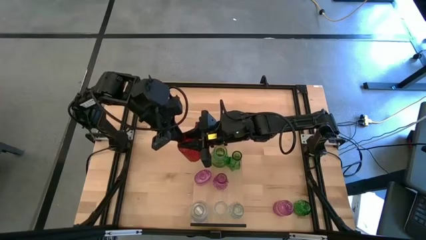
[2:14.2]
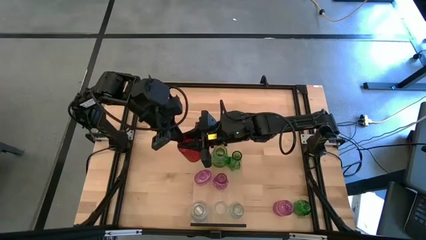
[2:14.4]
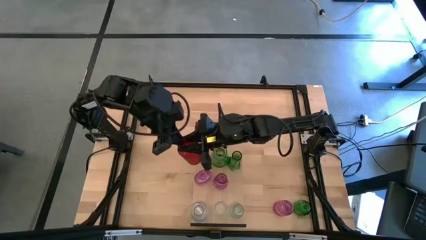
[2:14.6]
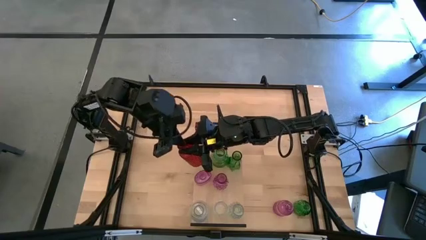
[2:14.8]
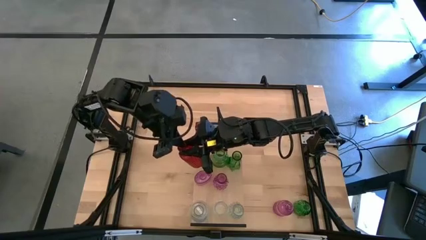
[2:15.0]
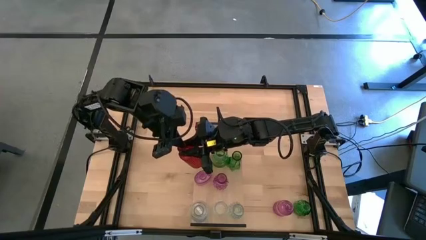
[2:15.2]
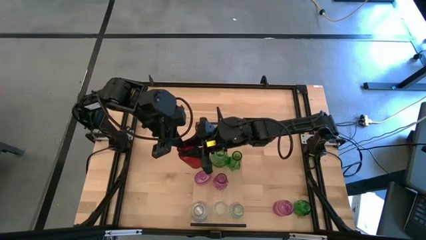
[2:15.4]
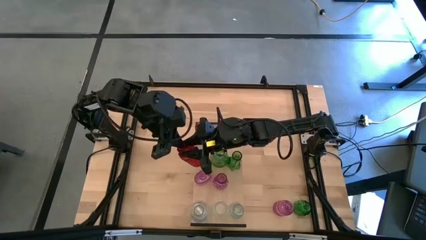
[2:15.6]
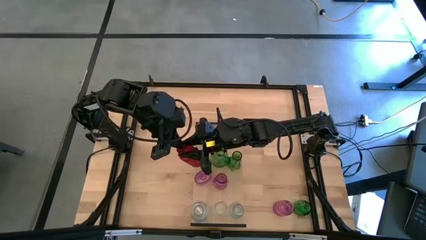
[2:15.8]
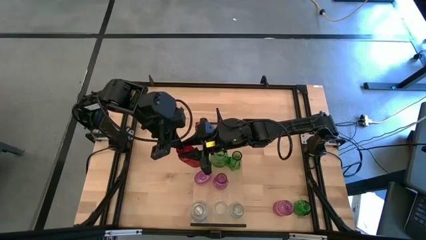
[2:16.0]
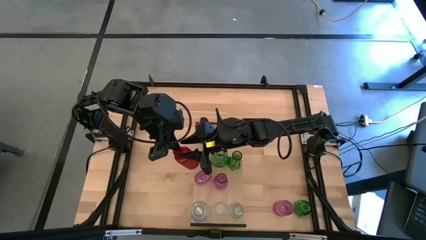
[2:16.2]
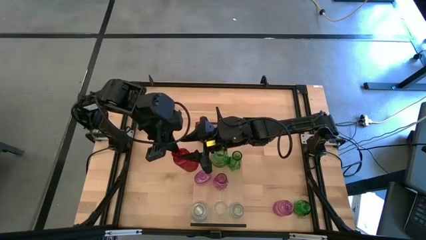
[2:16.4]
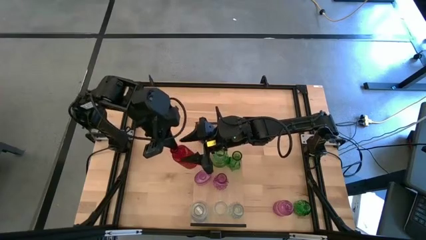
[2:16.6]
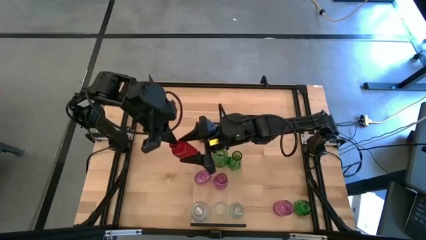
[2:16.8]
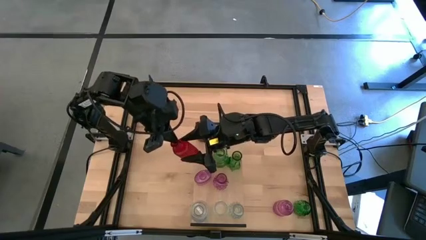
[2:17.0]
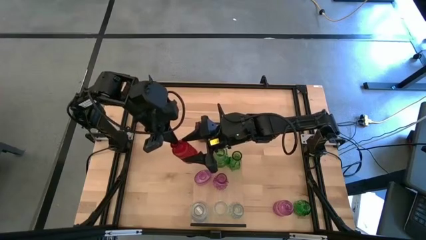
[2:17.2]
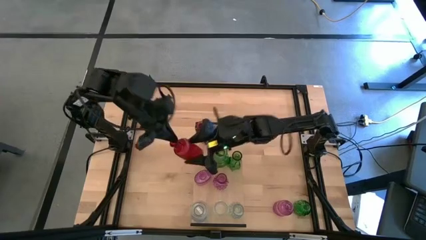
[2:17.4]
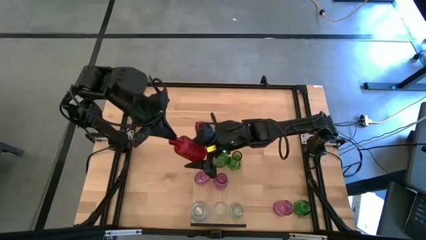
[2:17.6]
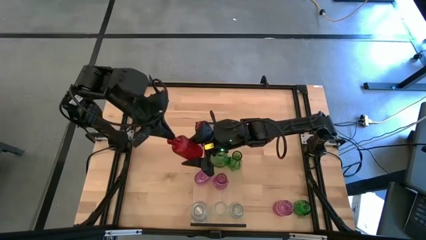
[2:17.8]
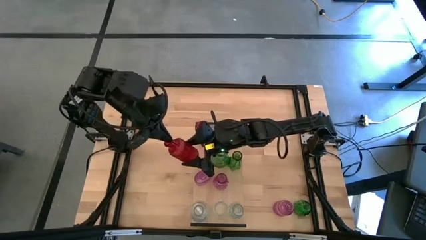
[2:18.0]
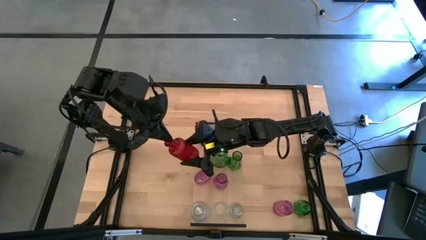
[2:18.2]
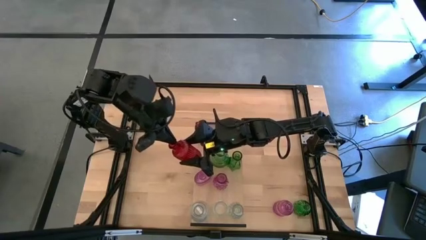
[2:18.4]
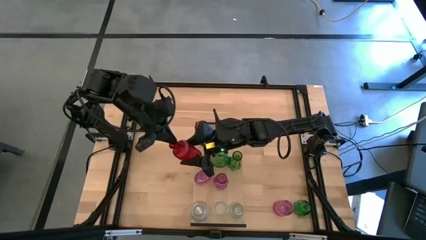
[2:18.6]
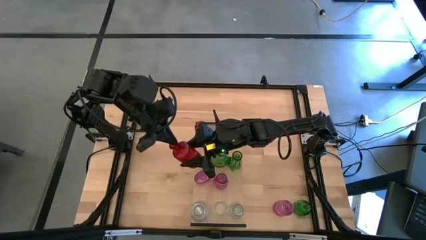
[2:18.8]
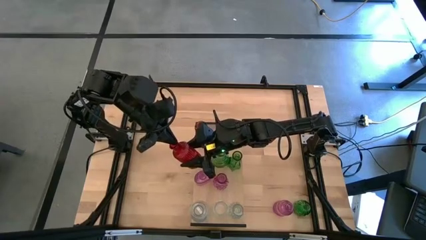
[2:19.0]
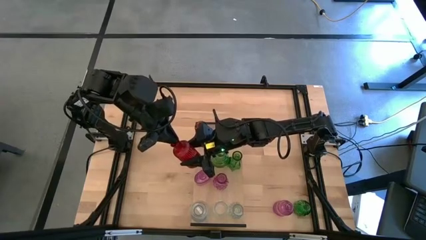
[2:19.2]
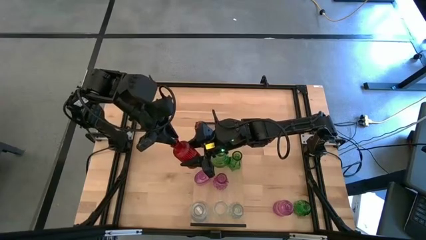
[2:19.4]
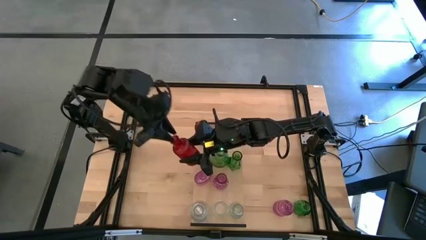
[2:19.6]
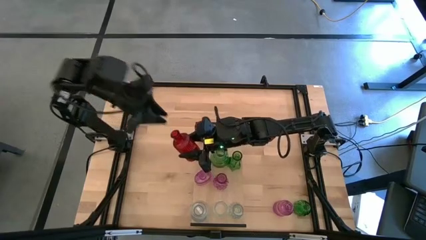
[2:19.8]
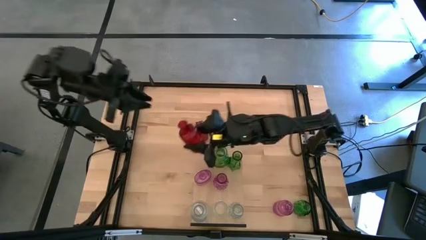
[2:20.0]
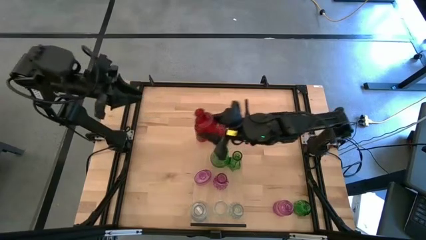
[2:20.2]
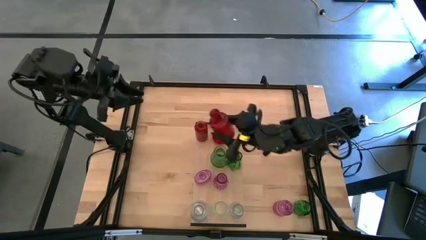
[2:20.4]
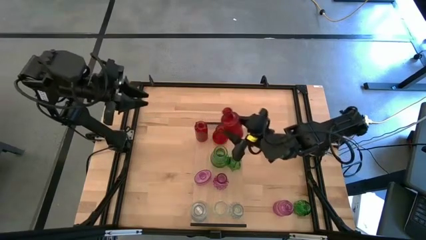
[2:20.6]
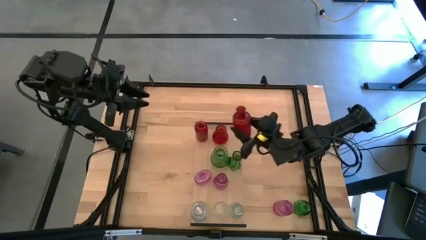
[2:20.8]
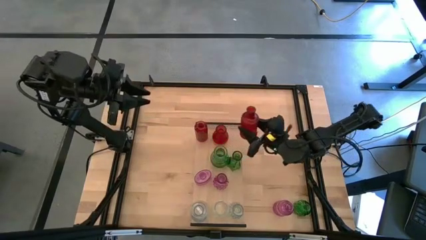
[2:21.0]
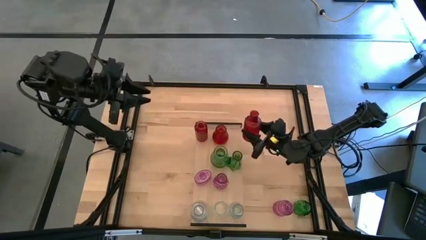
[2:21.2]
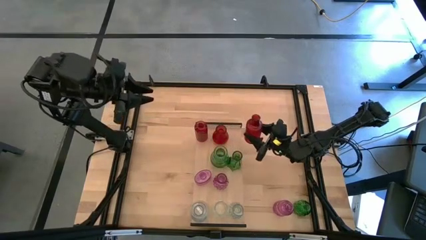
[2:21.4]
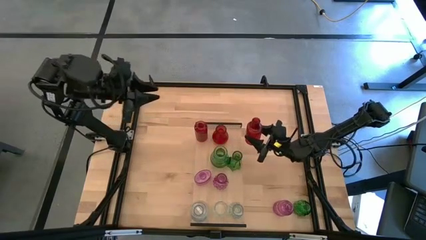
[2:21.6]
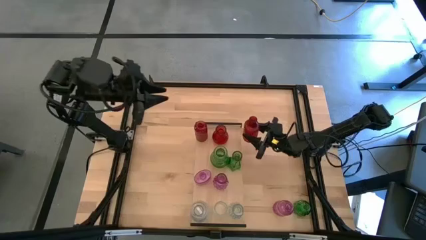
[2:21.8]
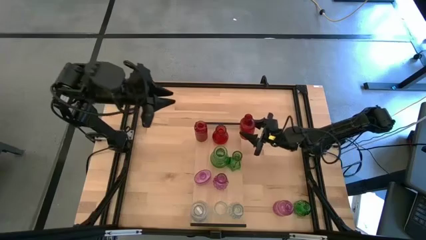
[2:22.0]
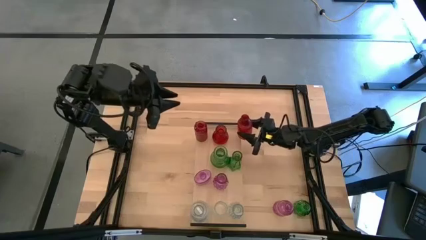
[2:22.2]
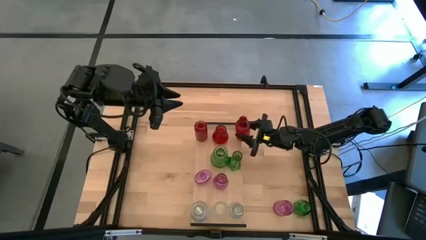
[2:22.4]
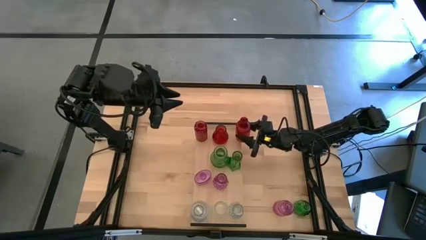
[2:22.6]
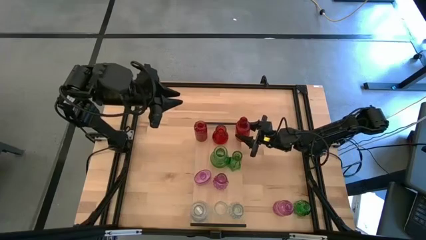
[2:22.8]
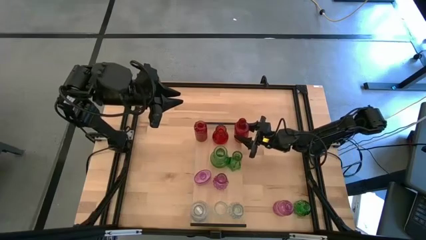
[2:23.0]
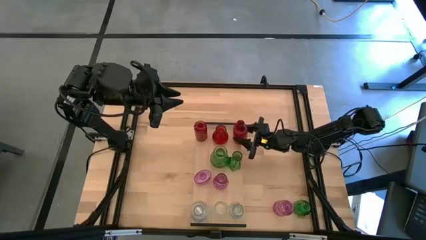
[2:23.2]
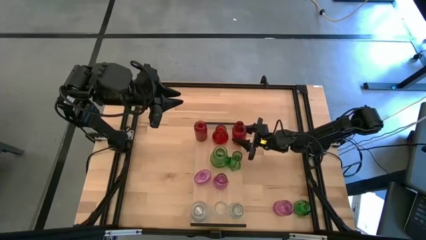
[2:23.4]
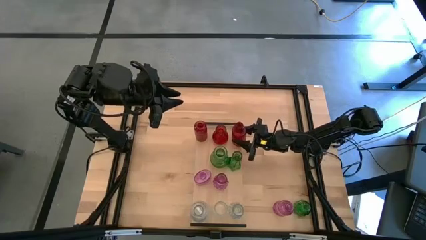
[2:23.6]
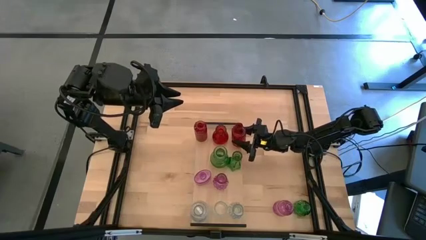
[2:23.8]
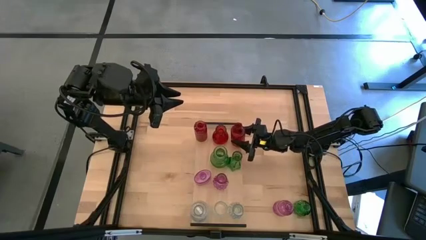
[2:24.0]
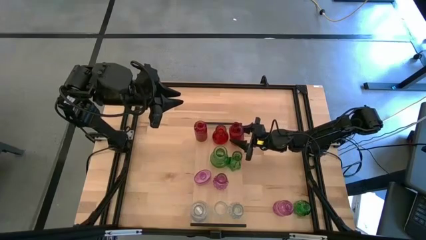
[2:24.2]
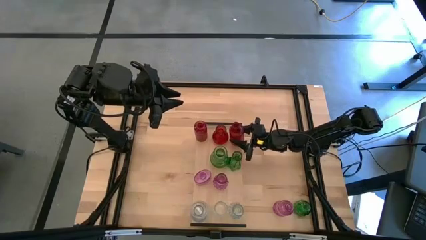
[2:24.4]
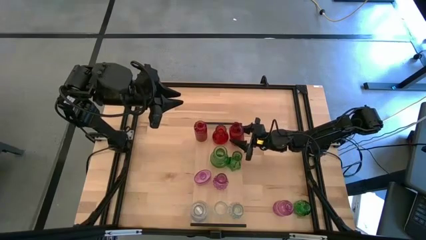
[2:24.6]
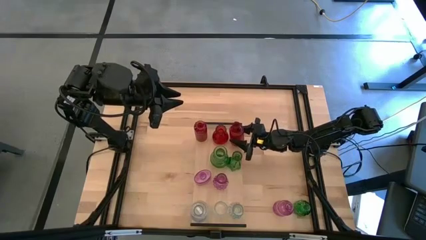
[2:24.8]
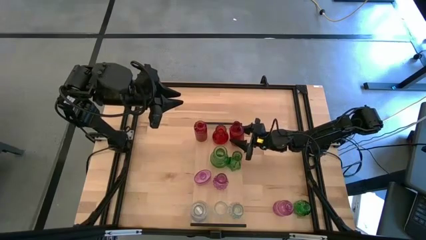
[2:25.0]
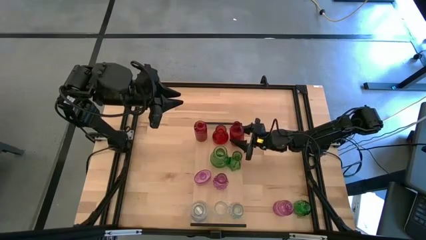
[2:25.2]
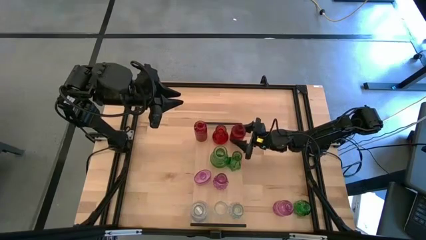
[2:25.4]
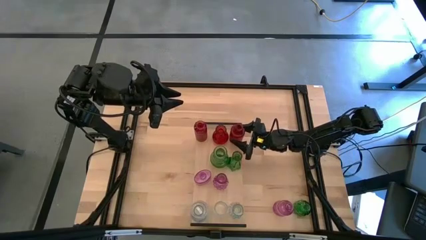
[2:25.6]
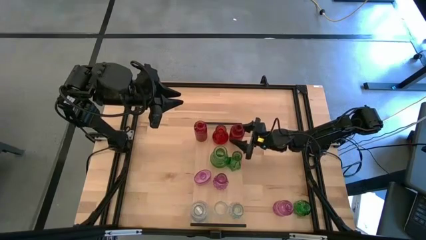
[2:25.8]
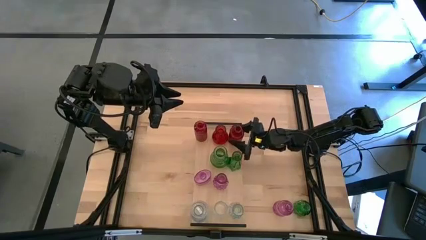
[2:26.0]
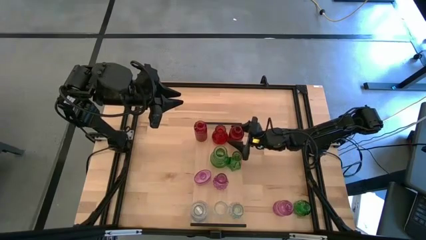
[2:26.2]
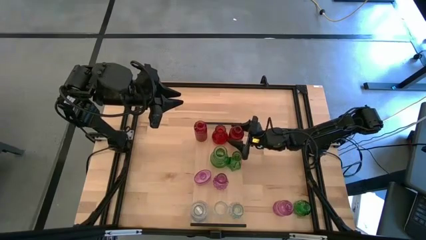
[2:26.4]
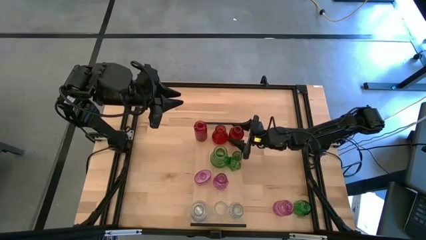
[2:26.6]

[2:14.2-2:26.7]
Task: sort vases onto shelf
Put the red vase on the shelf aligned with the other red vases

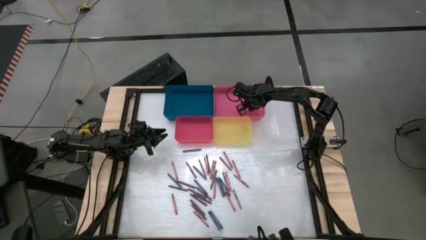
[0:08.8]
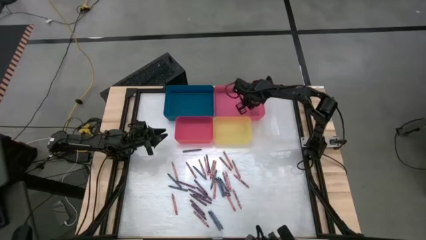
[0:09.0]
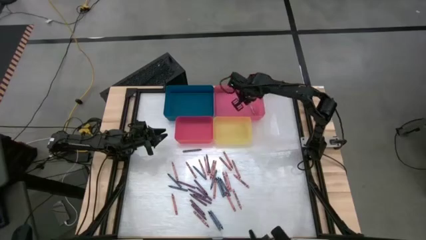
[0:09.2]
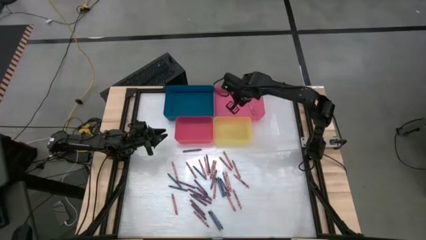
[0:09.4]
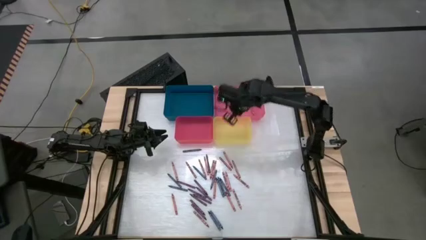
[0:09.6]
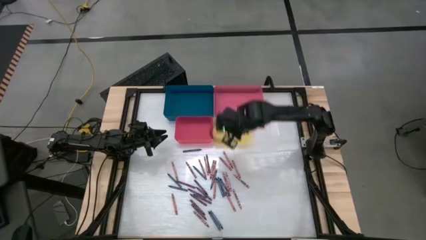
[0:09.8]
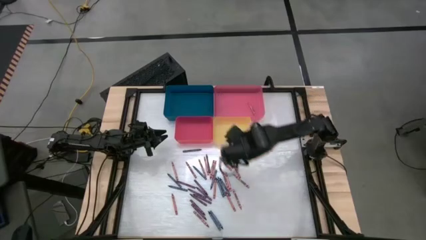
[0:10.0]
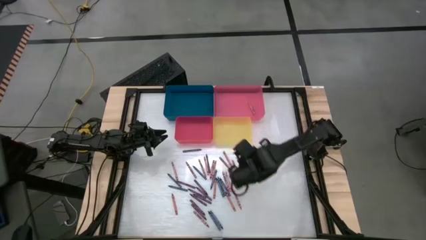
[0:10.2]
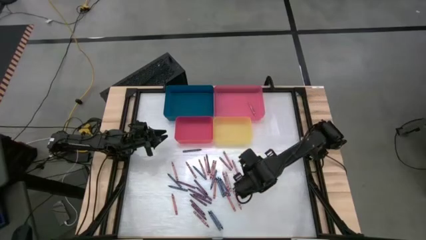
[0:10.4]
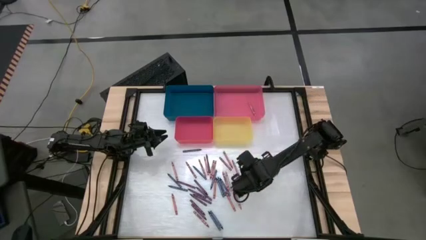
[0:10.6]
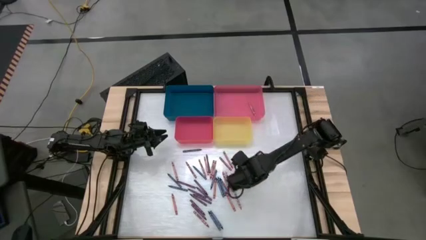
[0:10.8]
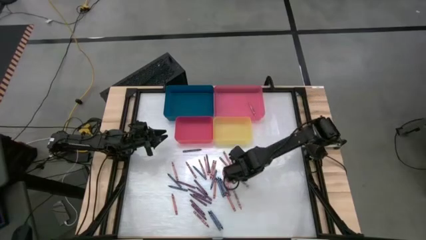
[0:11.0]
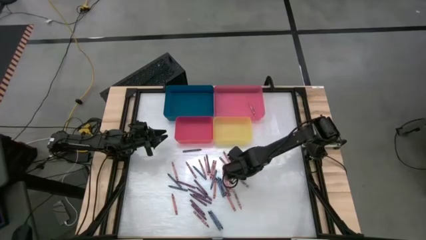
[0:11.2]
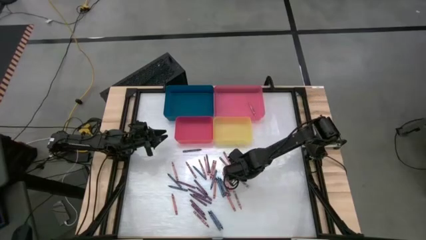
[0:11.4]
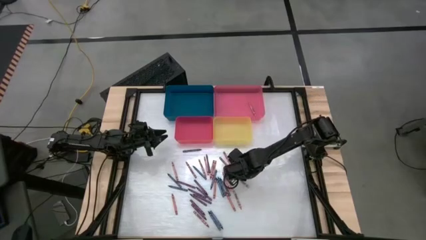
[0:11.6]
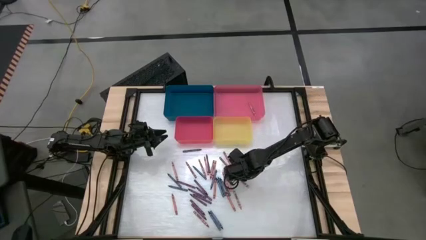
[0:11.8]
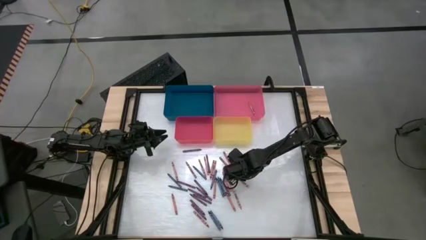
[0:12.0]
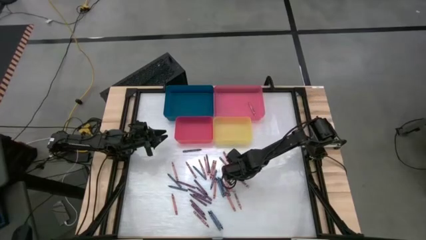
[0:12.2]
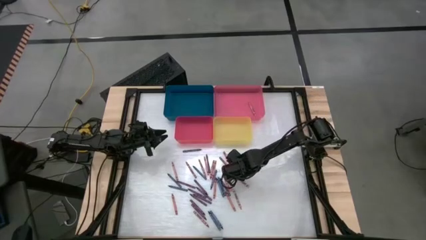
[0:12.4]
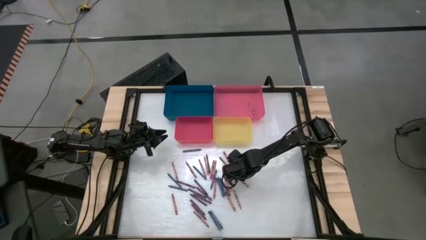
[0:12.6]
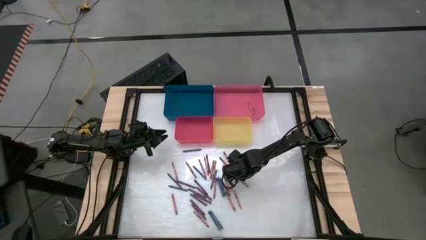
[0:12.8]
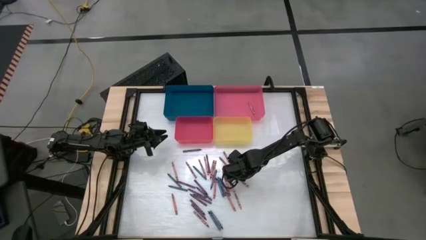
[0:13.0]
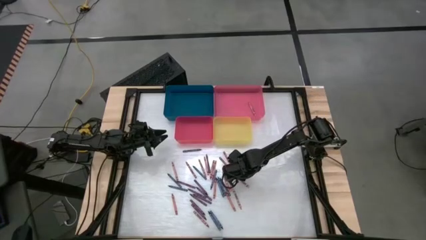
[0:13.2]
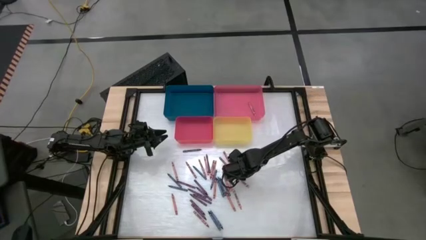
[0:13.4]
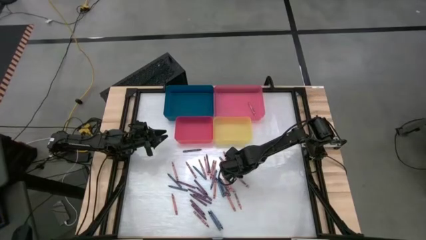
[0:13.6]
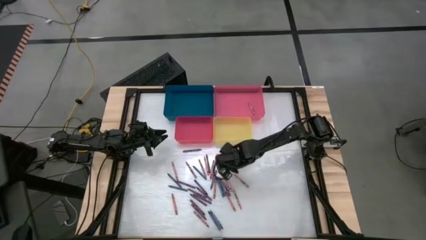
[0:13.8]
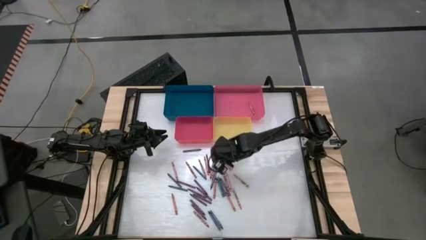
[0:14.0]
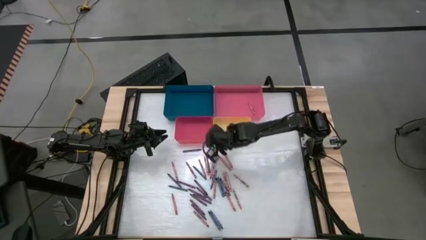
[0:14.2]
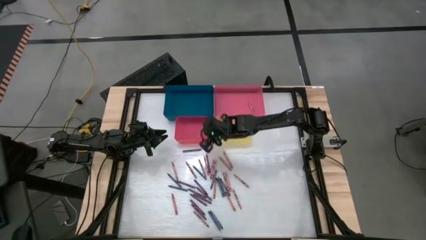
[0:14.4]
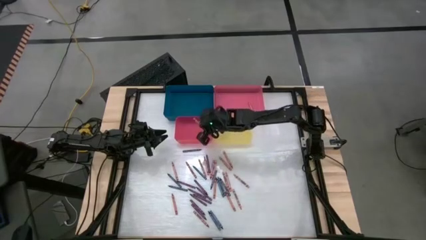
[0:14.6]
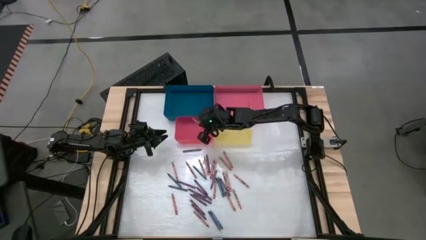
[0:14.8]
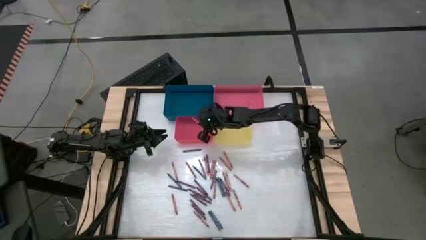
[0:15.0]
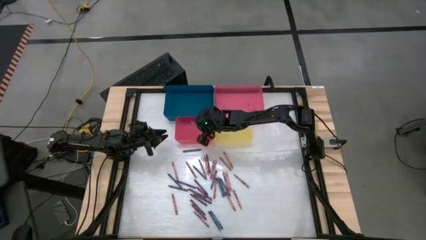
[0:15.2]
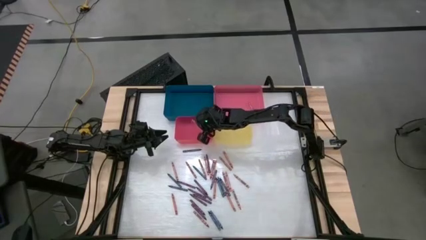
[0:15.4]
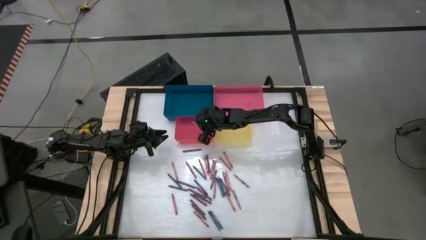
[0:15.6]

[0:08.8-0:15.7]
Task: Sort crayons
Put the red crayon into the red bin
